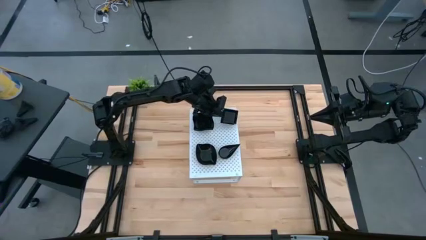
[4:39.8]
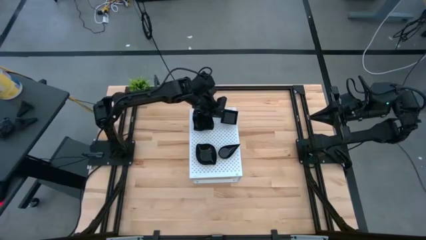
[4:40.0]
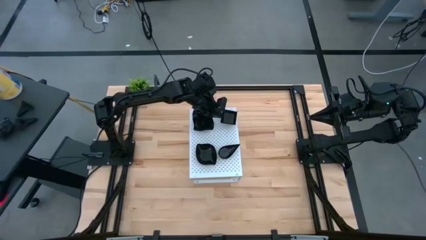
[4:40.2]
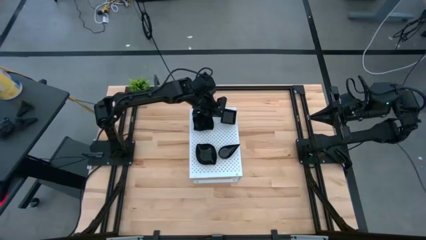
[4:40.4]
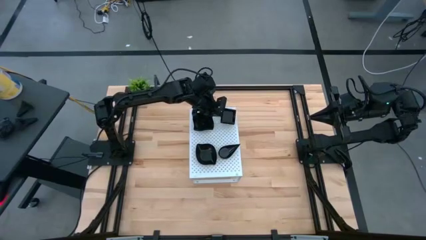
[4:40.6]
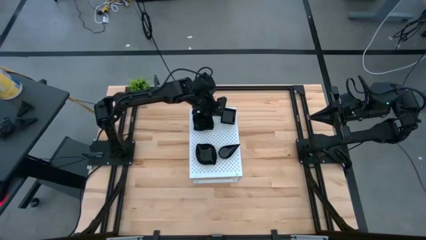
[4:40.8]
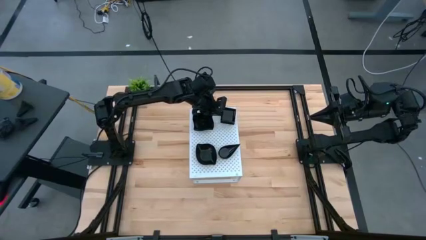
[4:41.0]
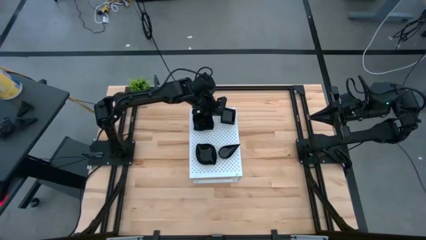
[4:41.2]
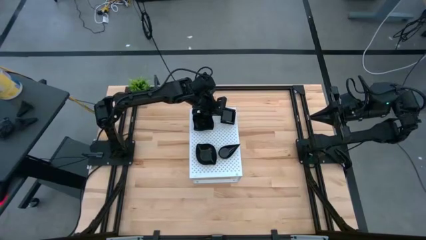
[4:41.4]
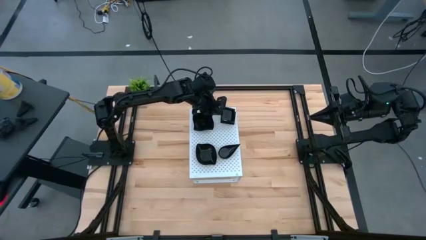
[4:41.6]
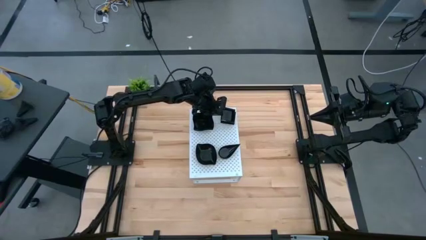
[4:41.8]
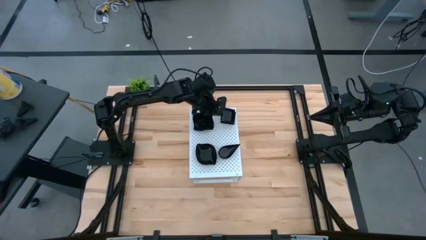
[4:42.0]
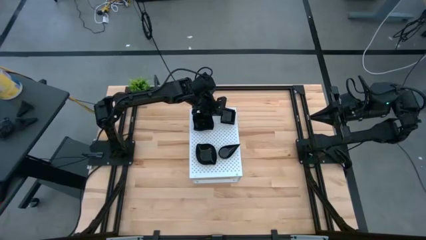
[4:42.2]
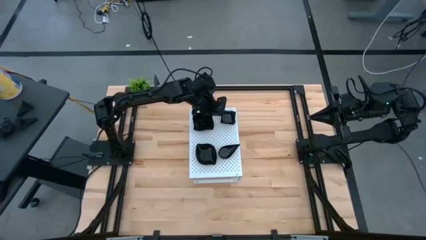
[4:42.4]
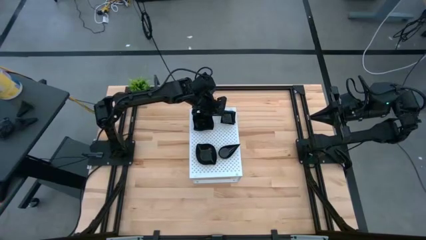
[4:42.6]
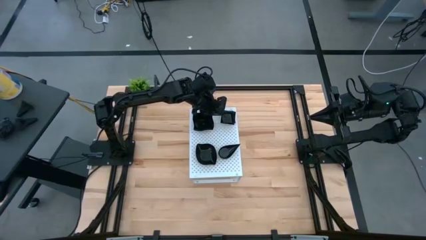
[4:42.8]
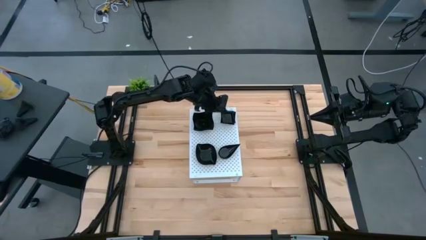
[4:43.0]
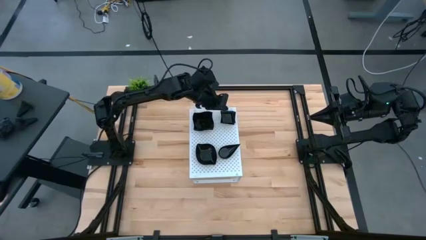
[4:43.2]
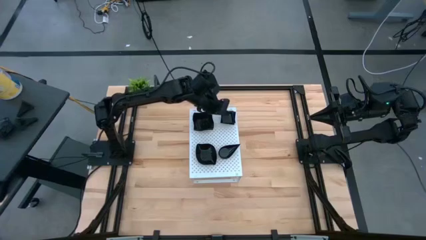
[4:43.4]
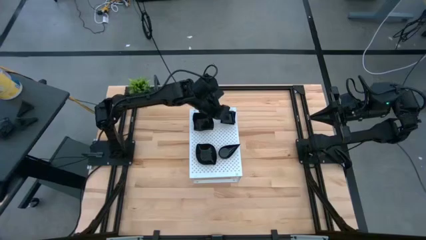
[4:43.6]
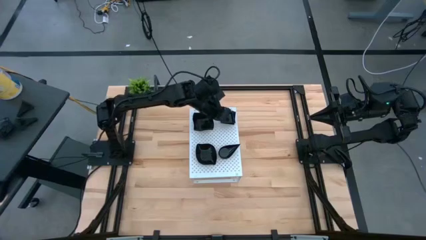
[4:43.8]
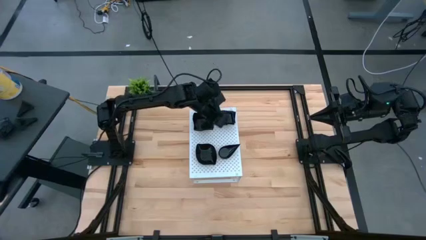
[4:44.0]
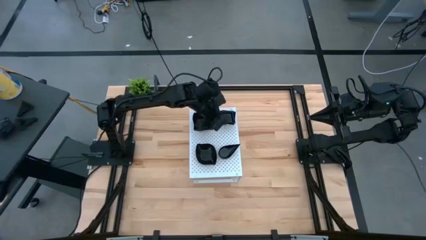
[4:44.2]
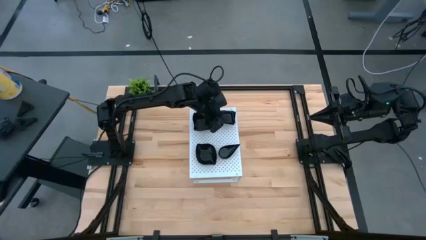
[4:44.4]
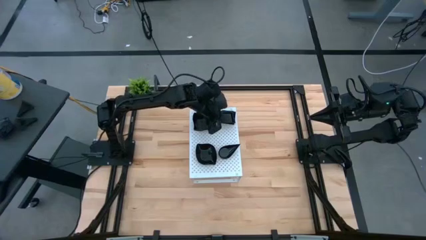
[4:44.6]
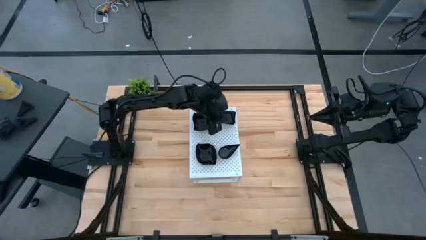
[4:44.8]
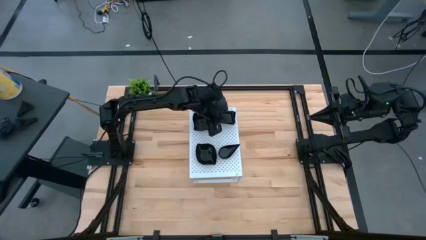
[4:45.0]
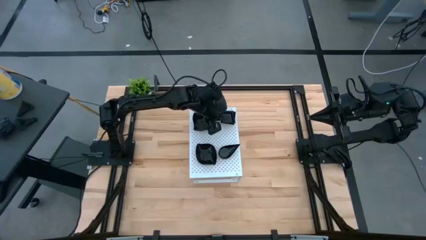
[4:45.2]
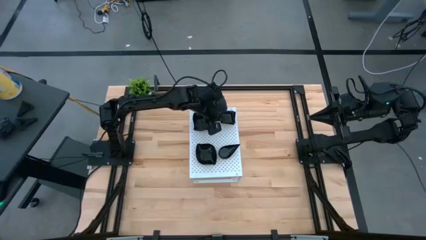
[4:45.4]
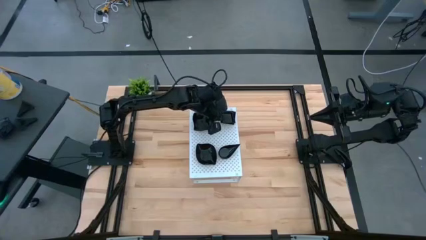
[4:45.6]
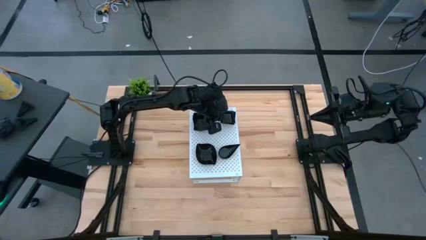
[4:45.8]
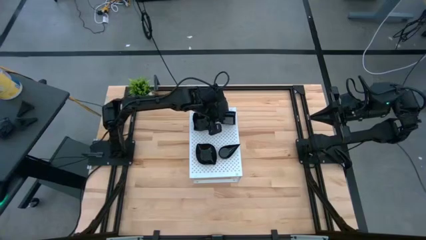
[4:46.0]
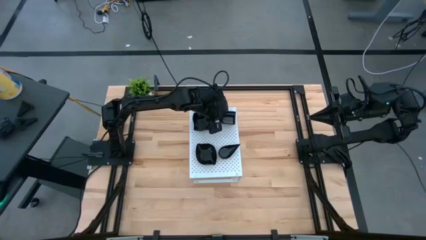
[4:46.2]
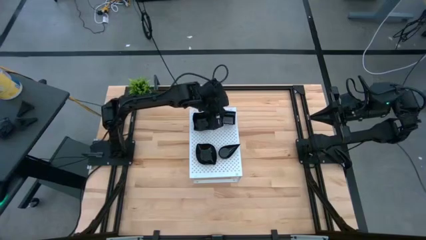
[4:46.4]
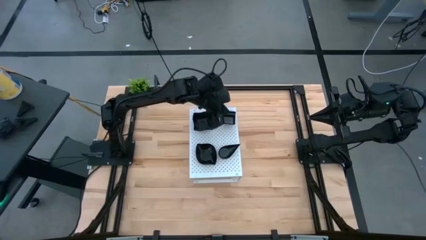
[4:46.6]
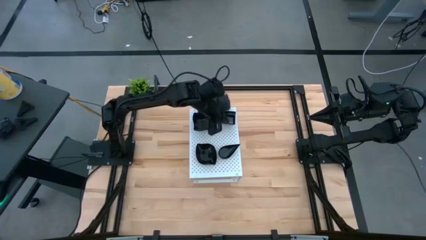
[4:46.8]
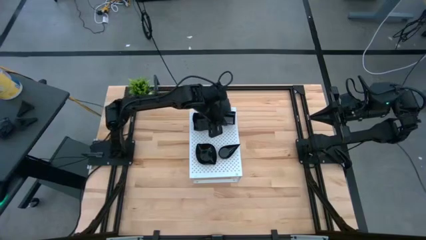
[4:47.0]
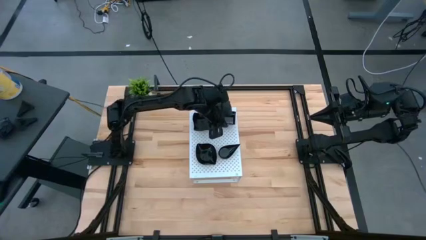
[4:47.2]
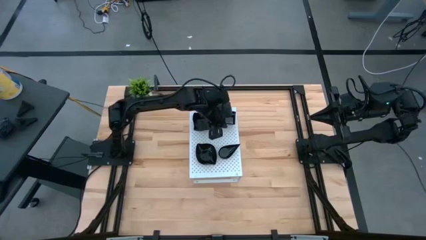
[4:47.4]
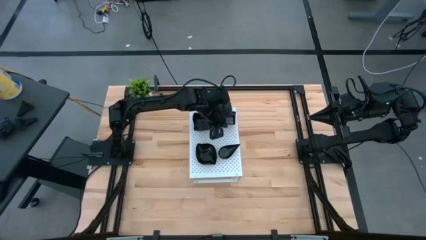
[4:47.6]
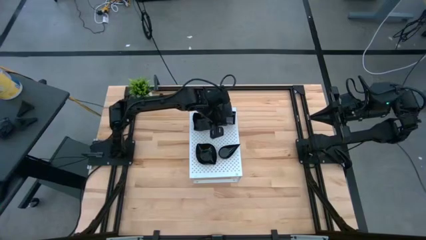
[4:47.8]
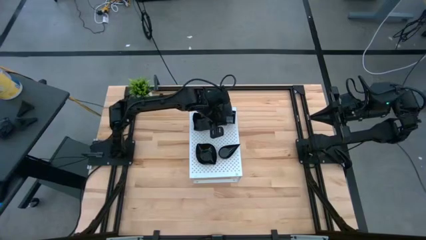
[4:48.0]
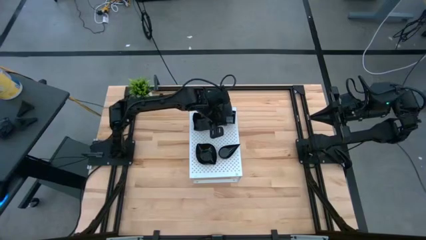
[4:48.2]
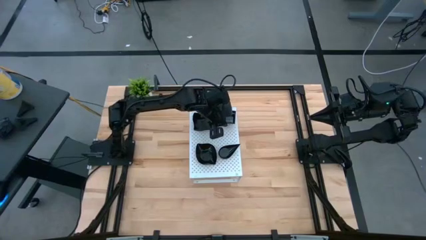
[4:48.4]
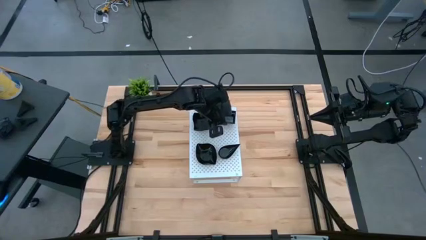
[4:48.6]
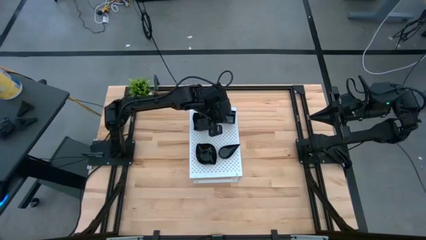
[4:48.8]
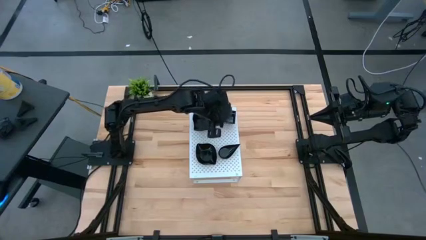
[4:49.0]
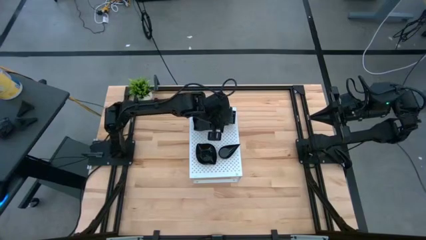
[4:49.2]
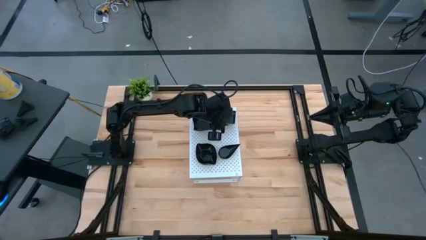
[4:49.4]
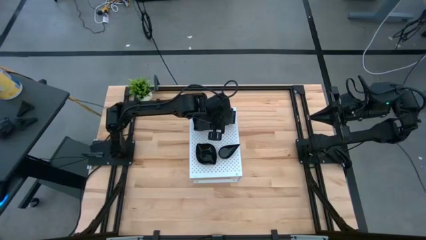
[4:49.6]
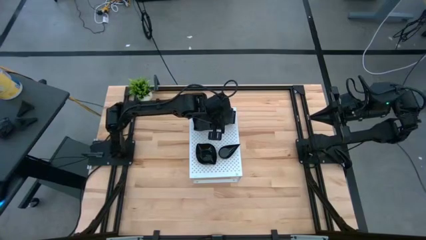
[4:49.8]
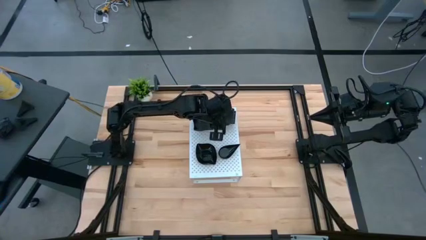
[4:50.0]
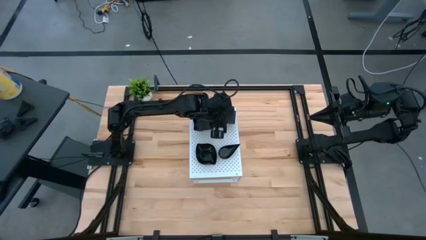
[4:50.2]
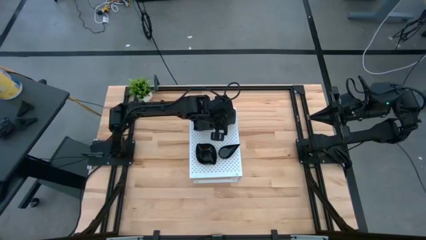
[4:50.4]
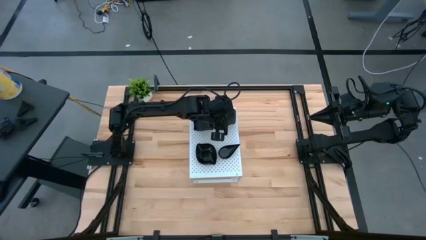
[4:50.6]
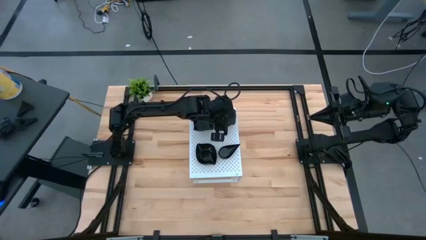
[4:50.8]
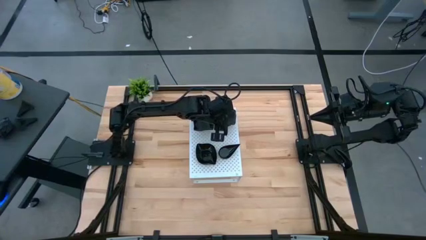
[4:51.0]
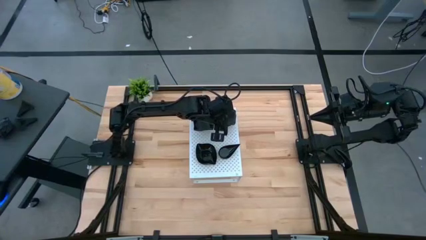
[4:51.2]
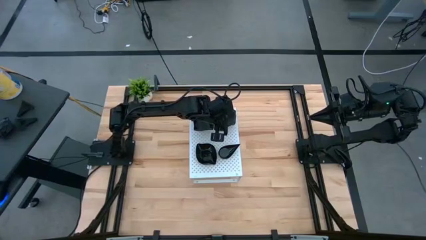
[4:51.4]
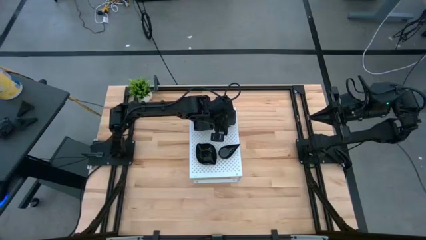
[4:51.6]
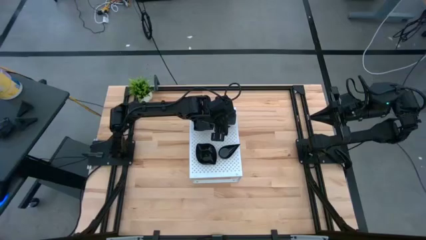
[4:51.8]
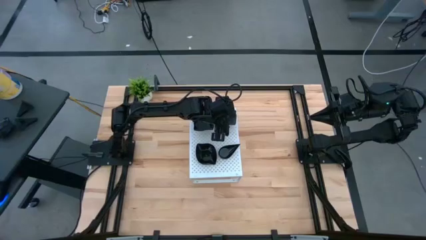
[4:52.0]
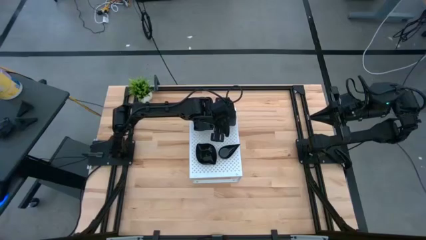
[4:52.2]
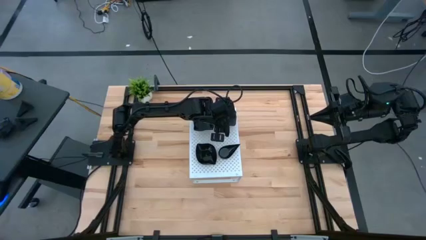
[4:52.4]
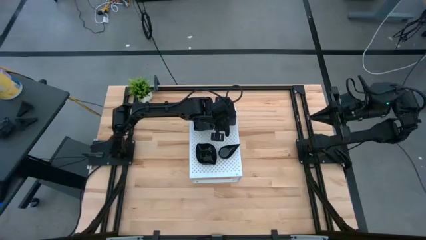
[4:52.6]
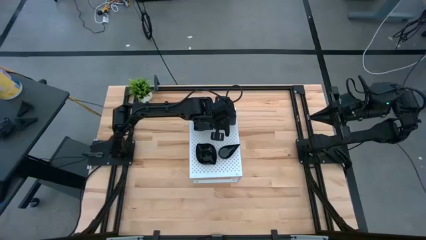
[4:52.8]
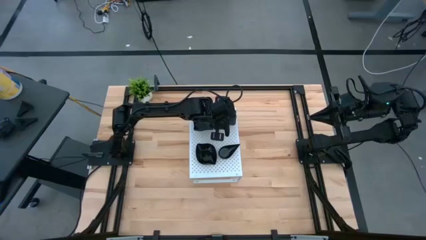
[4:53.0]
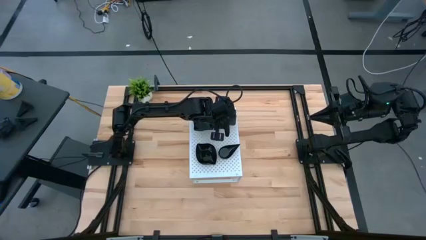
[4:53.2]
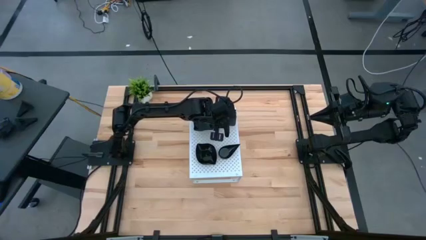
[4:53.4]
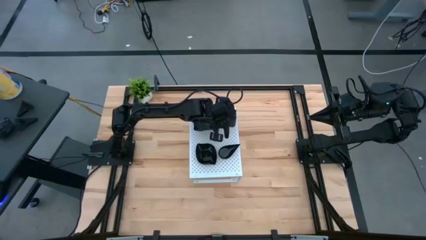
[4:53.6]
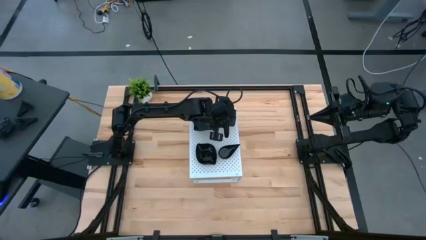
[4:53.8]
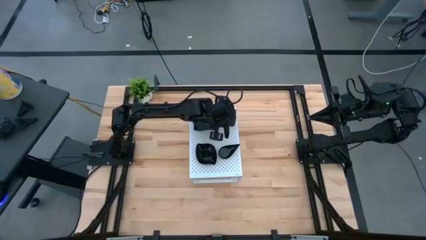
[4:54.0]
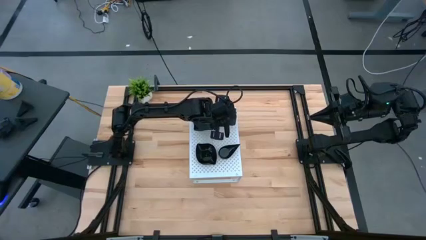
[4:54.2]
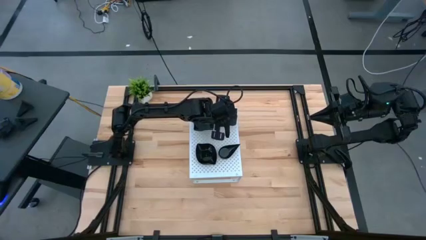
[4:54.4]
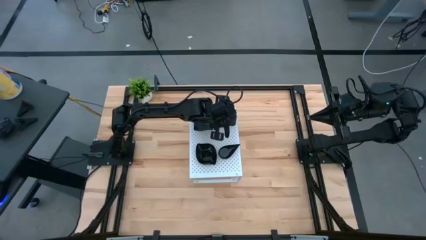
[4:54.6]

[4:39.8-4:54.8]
Task: Pick & Place Mini shaped plates
Stack the black square plate on top of the other black square plate on the shelf
